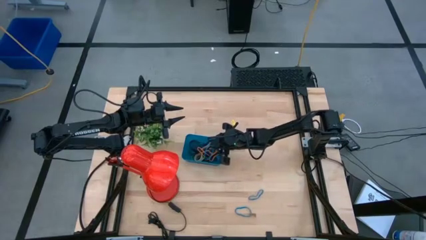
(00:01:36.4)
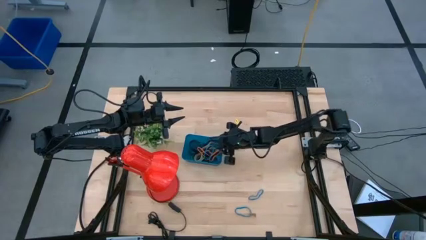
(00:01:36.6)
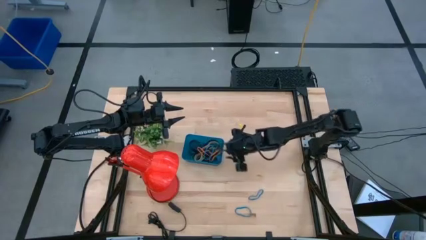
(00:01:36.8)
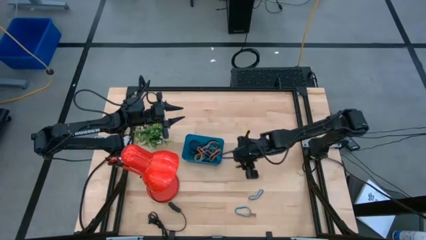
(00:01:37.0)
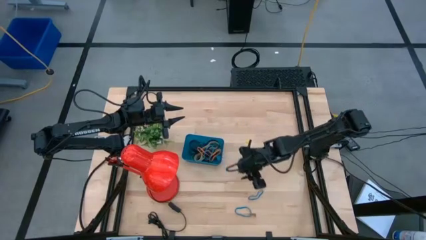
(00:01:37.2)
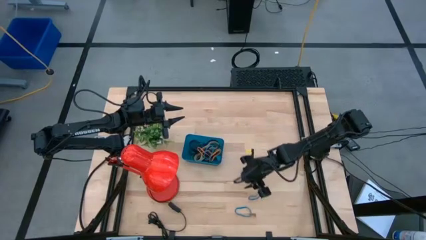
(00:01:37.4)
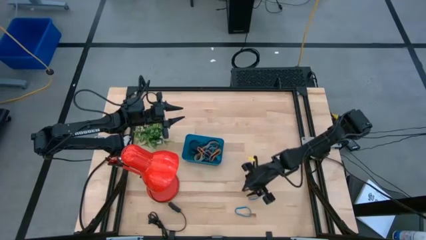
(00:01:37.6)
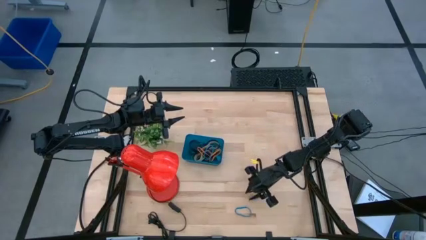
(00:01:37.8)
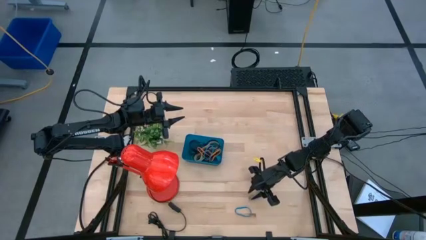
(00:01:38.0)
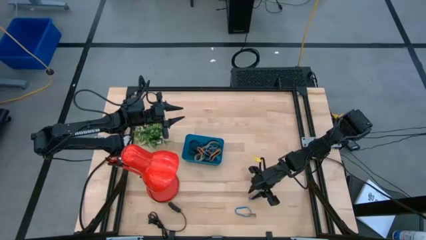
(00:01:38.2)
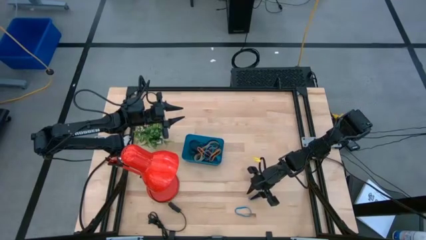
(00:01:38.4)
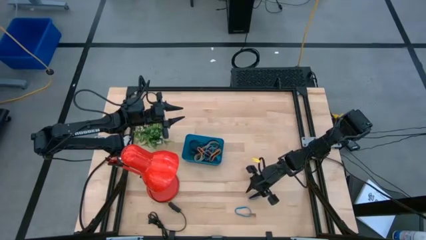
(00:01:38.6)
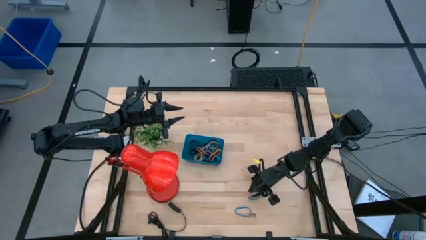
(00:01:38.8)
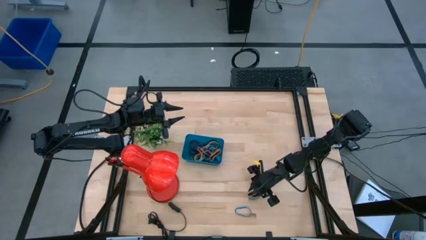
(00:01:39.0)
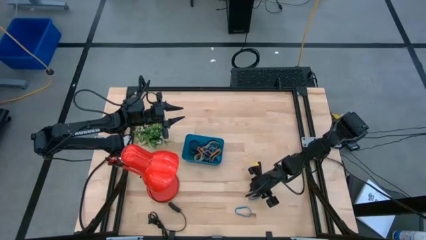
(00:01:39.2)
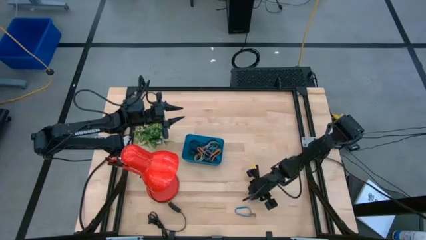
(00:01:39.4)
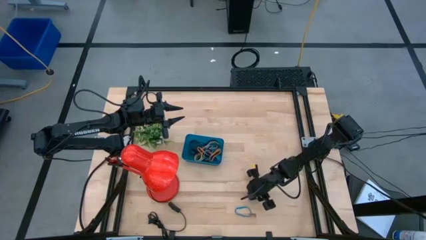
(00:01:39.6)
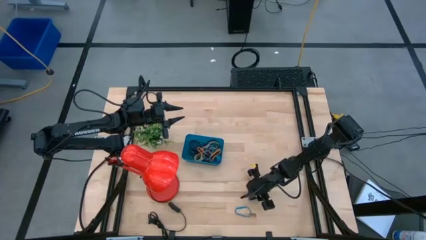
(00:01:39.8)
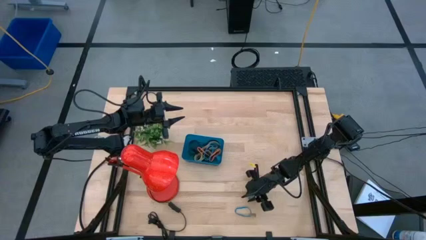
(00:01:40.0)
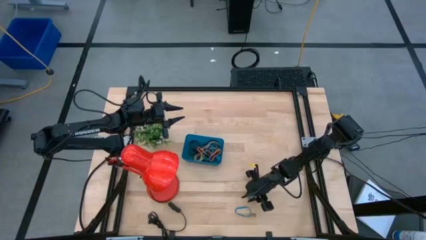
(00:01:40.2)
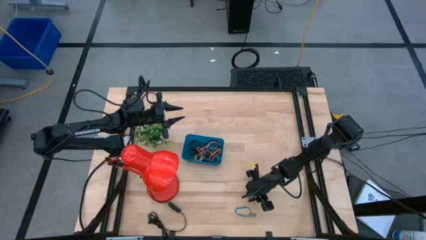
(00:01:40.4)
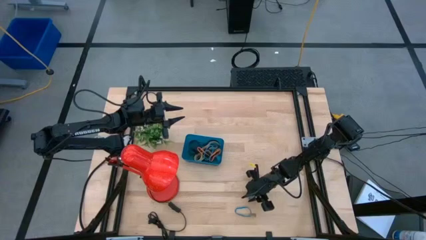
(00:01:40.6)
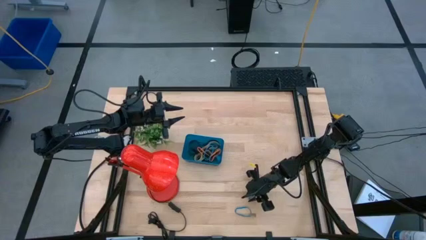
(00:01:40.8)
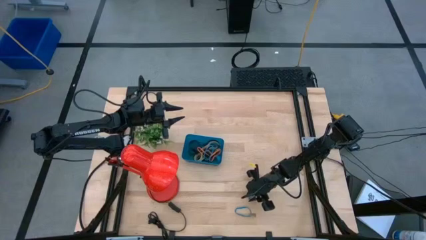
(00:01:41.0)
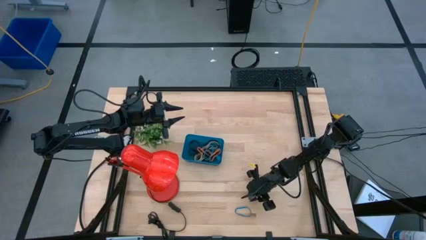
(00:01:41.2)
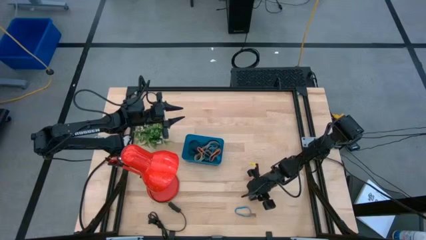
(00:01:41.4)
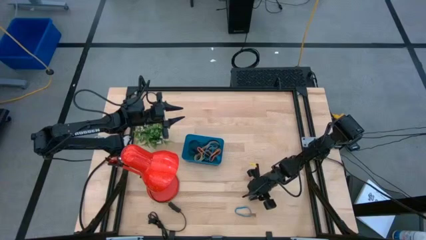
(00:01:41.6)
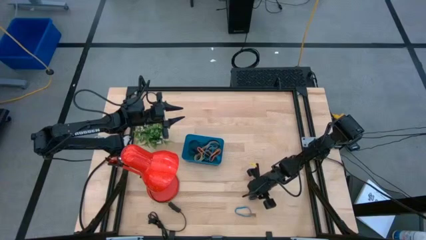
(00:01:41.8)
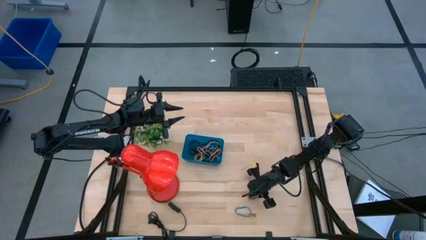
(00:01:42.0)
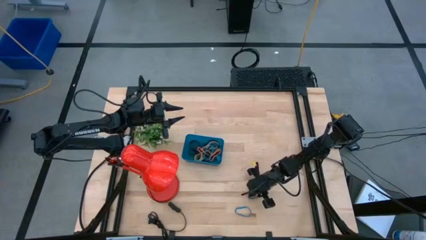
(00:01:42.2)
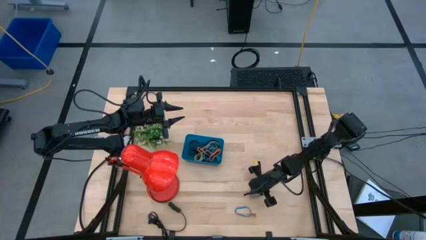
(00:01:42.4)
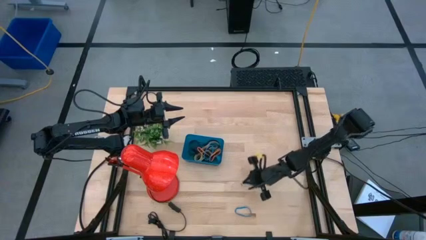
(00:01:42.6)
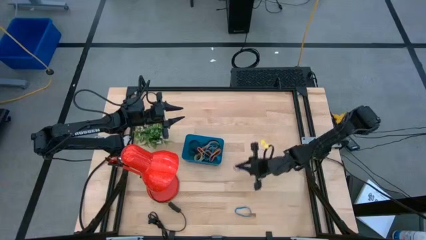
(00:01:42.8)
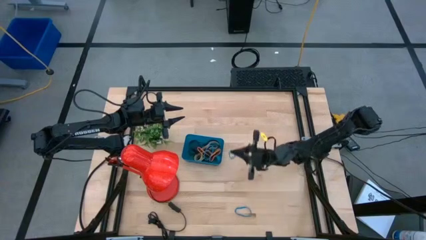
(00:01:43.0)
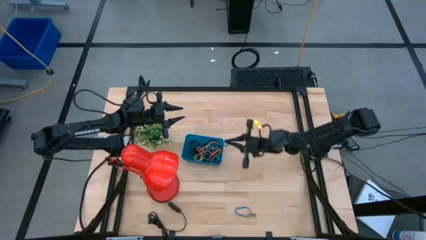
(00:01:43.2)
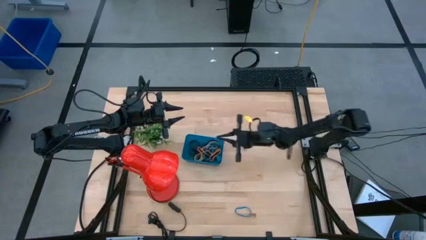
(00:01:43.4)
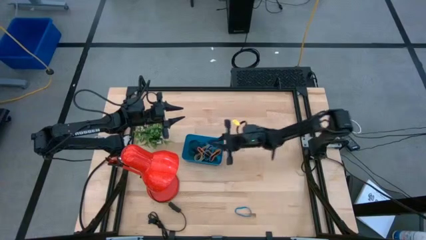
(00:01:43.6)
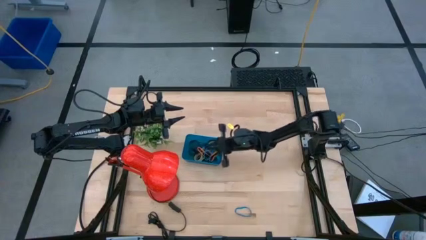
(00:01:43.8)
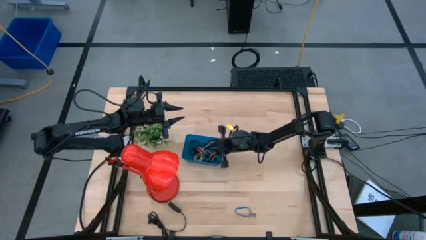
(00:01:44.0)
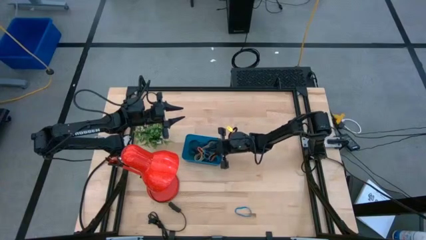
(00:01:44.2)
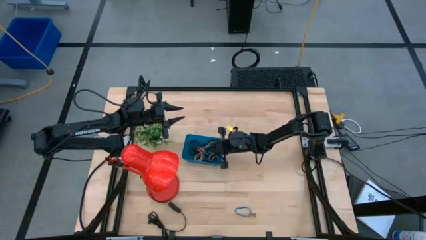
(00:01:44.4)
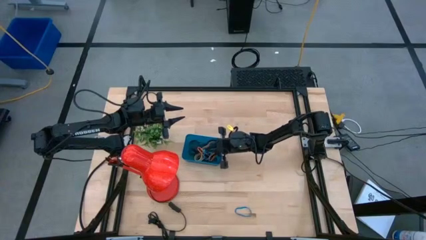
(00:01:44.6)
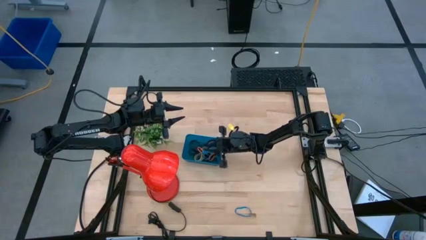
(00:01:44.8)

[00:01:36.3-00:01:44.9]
Task: Pick and place rubber bands into bin
Put the blue rubber band into the blue bin

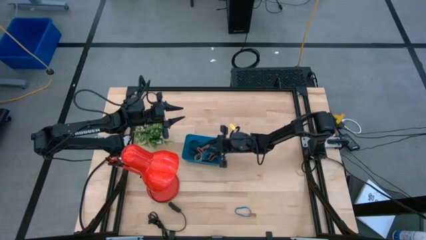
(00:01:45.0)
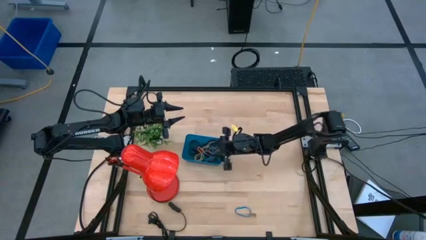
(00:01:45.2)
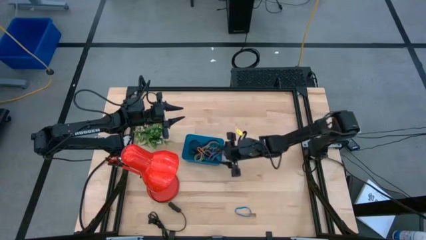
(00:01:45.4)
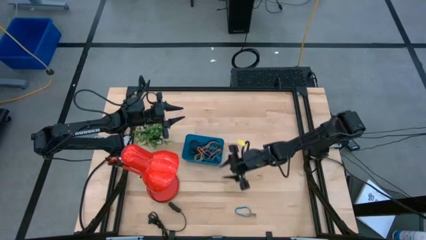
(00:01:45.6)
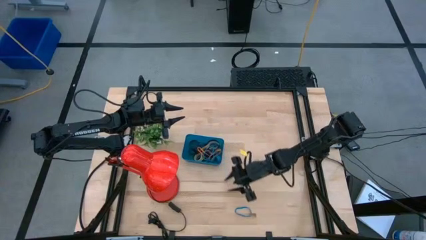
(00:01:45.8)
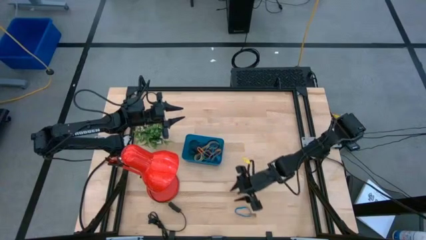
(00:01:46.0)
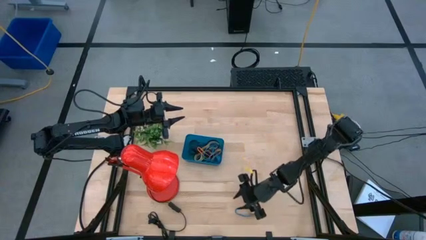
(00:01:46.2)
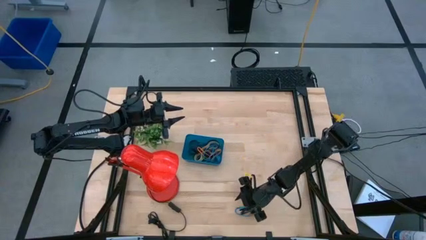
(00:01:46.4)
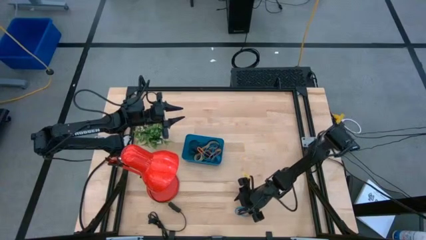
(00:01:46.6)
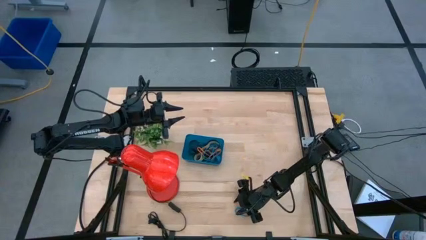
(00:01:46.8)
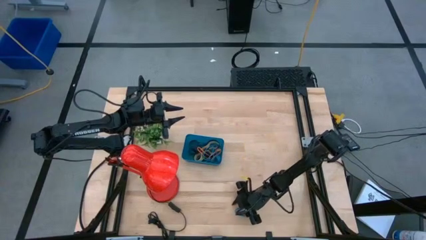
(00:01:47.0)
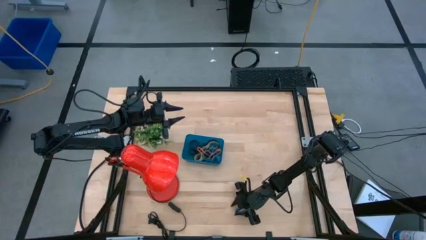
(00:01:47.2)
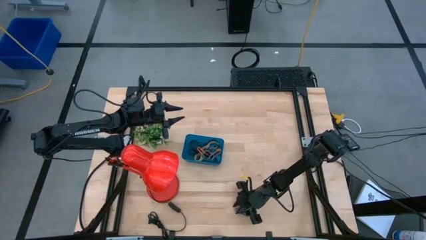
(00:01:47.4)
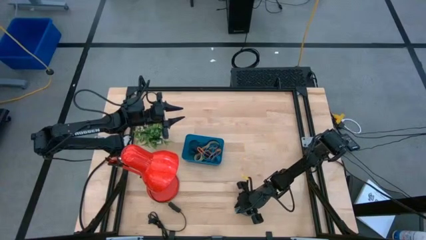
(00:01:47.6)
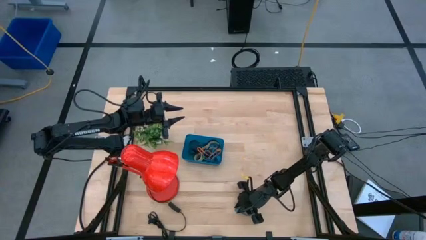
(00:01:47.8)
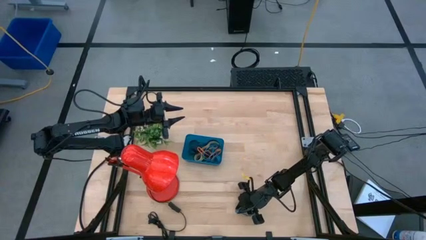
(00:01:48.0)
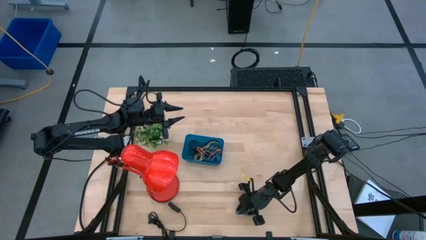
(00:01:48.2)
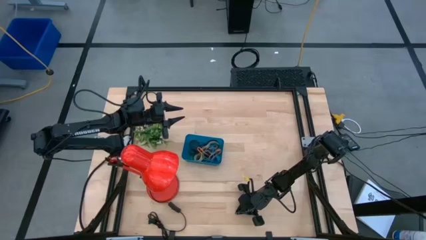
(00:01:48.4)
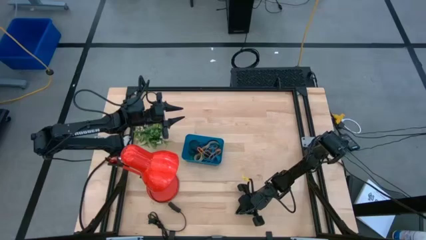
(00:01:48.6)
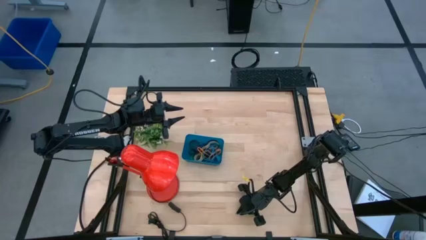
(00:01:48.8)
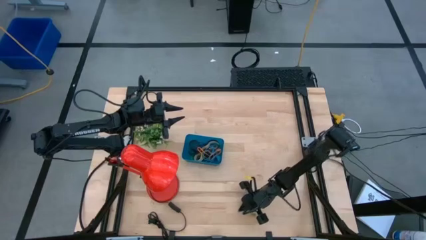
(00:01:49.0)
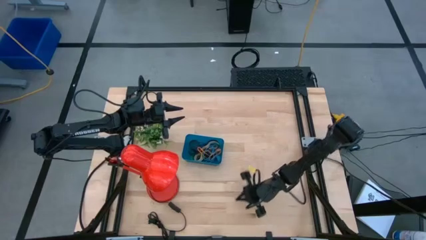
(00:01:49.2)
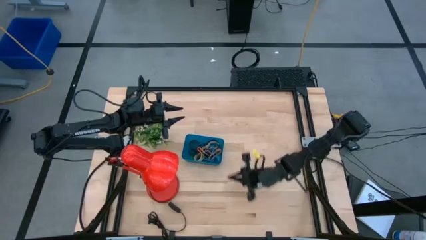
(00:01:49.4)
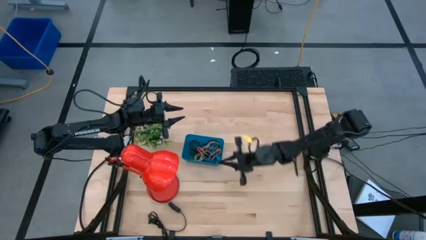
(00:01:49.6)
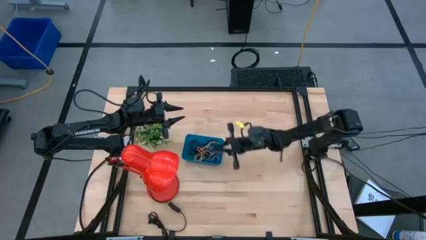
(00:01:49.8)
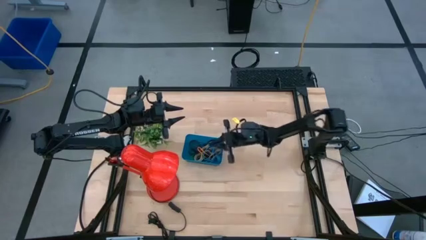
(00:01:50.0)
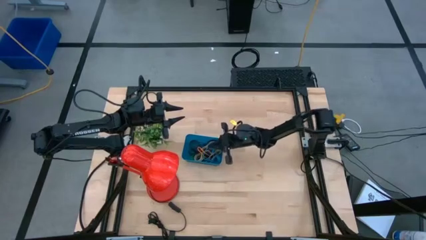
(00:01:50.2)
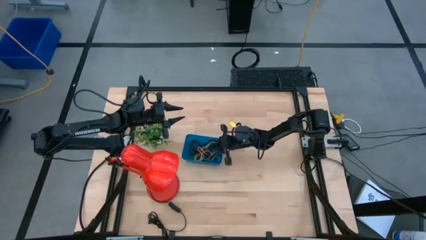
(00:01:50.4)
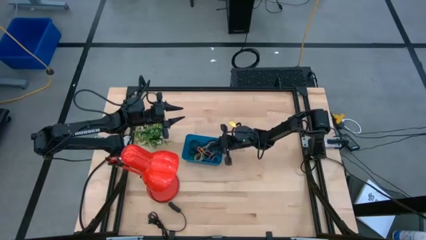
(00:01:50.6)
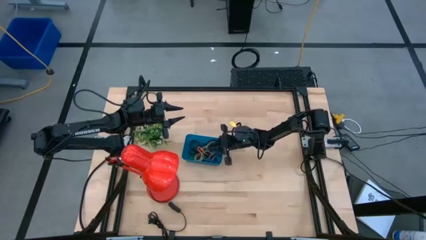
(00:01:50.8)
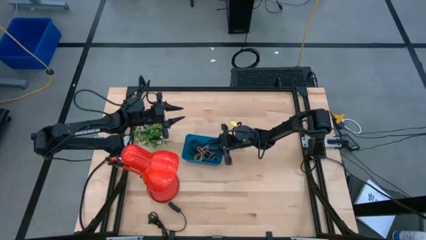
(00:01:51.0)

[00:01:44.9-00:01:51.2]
Put the blue rubber band into the blue bin
